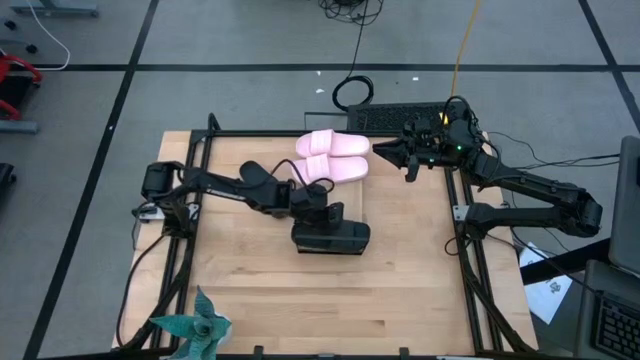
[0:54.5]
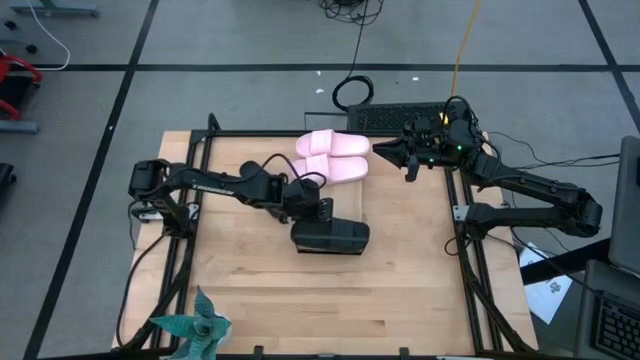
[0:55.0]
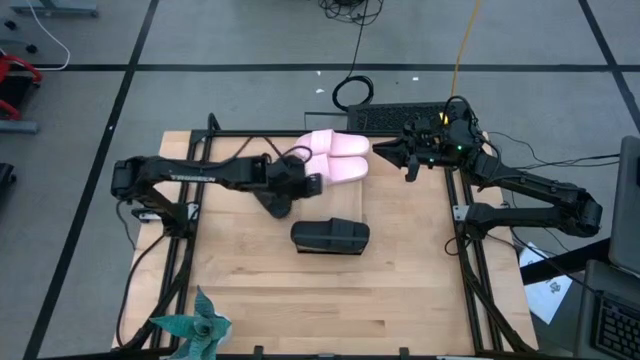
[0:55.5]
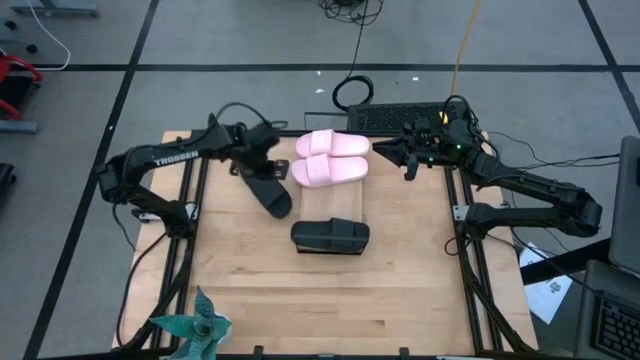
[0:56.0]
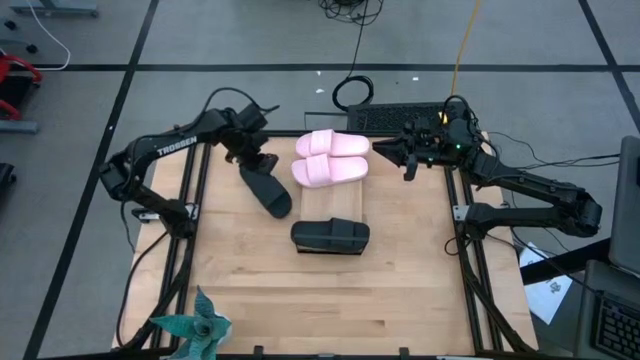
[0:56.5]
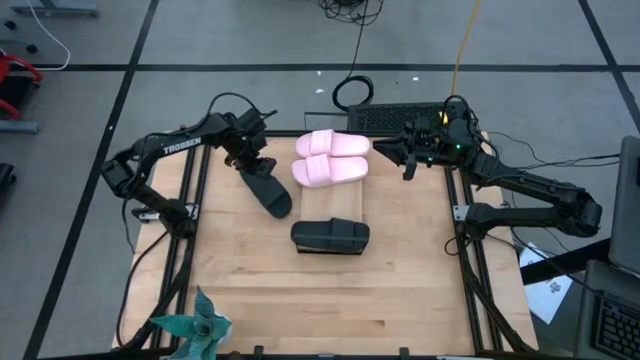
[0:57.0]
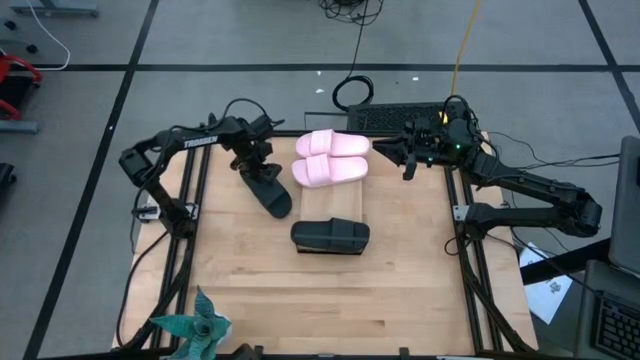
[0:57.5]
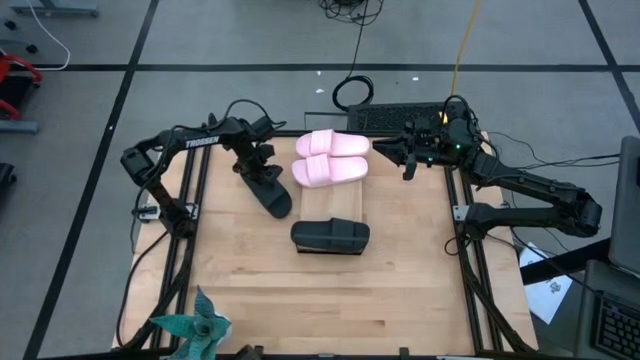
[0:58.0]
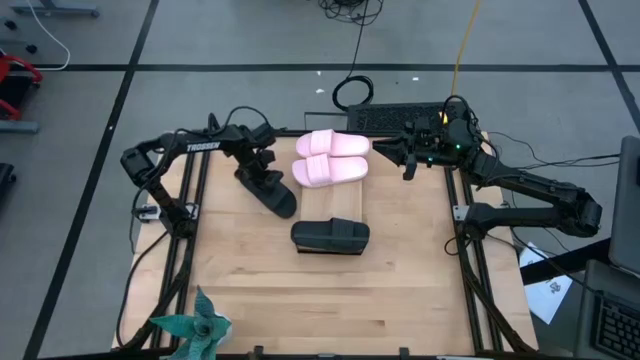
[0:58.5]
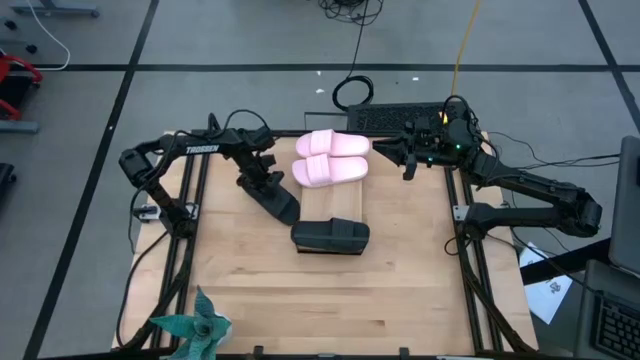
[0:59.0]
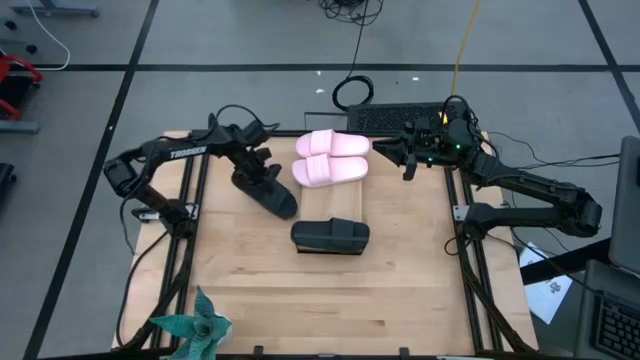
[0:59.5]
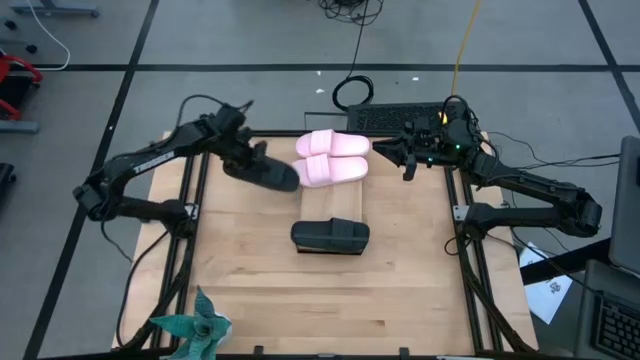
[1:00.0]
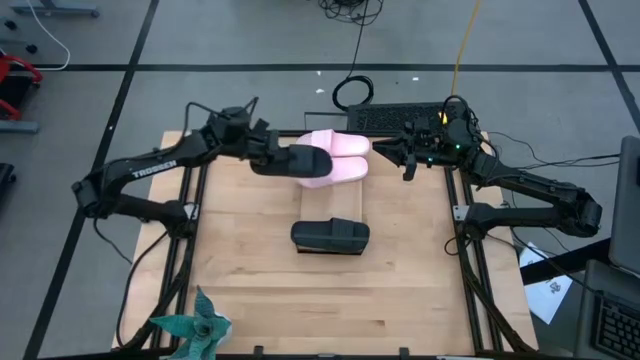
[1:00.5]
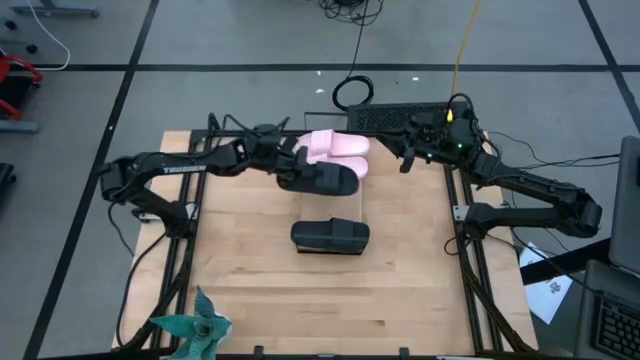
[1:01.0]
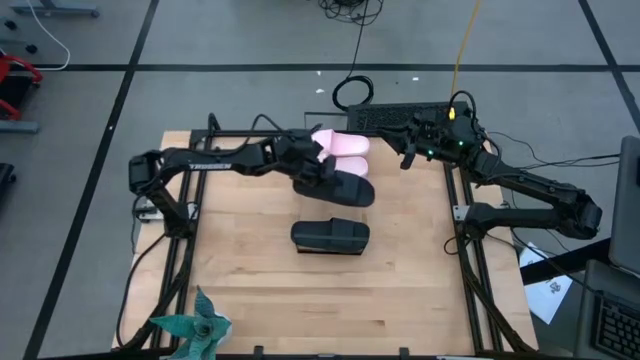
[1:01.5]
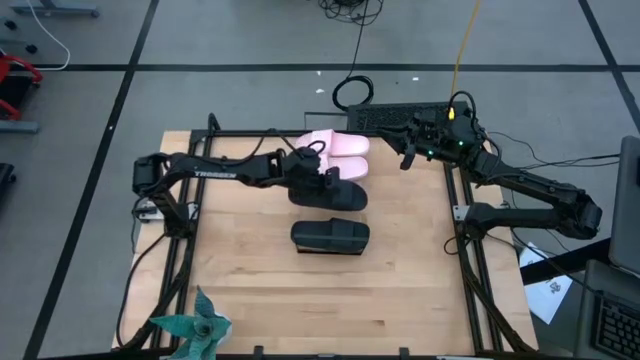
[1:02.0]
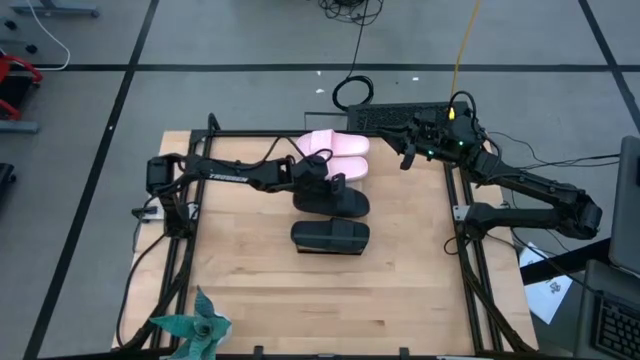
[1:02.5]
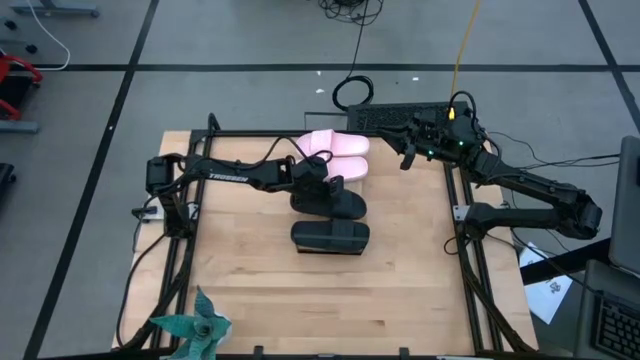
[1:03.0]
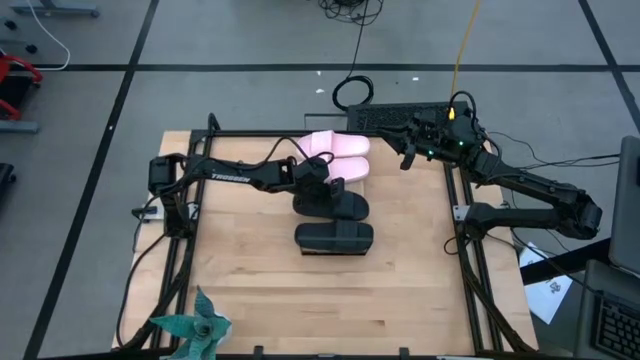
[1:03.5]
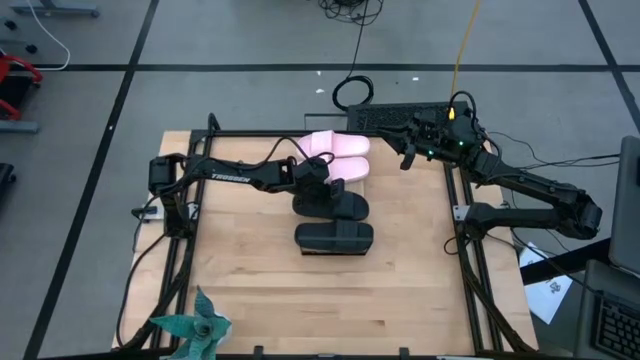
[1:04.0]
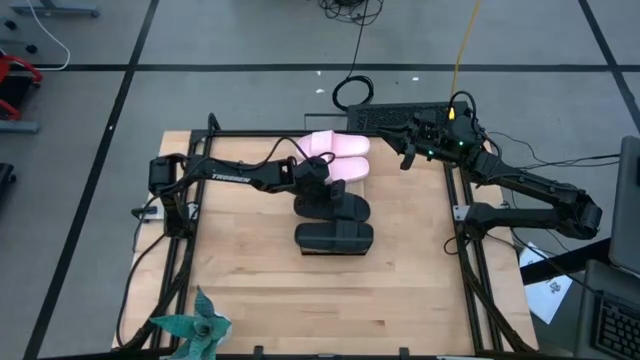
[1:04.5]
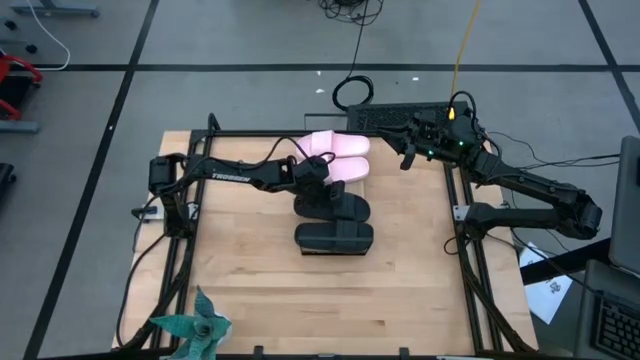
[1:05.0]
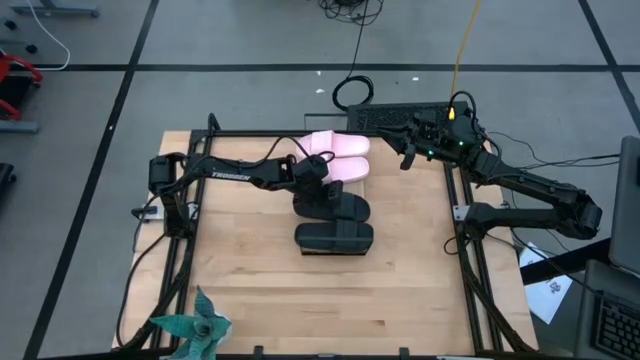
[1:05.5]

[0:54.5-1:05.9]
Task: Pick and place slides into the shelf
Put the black slide on the shelf

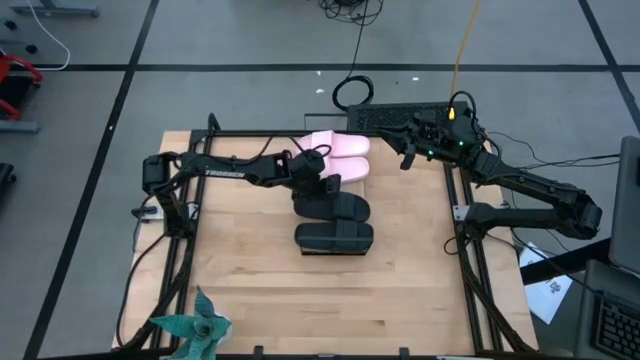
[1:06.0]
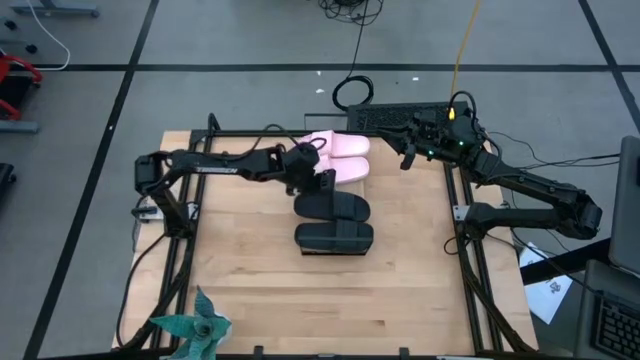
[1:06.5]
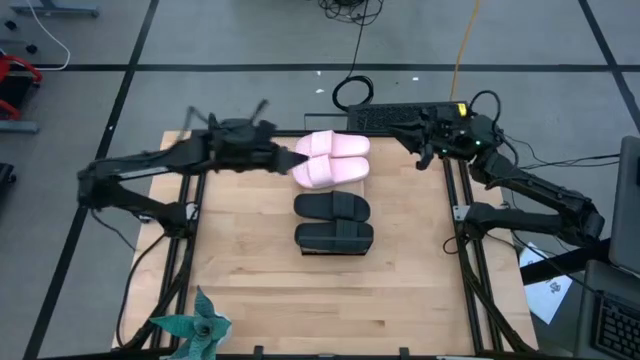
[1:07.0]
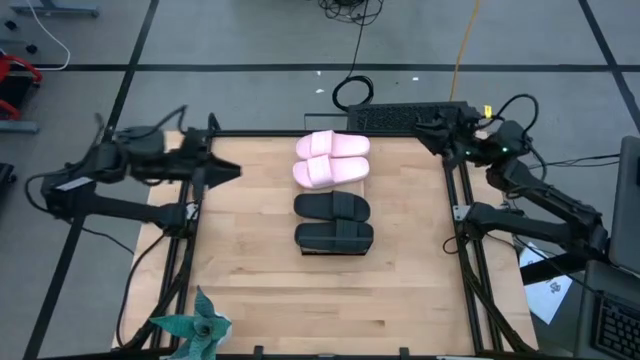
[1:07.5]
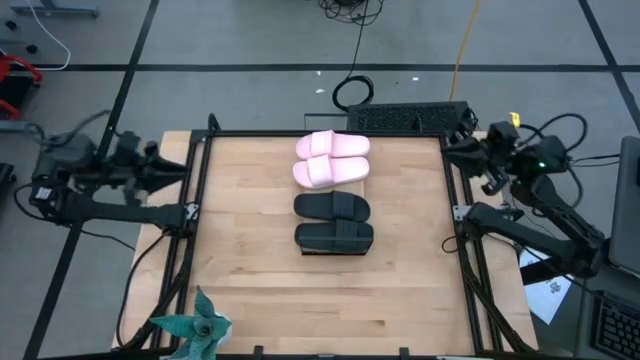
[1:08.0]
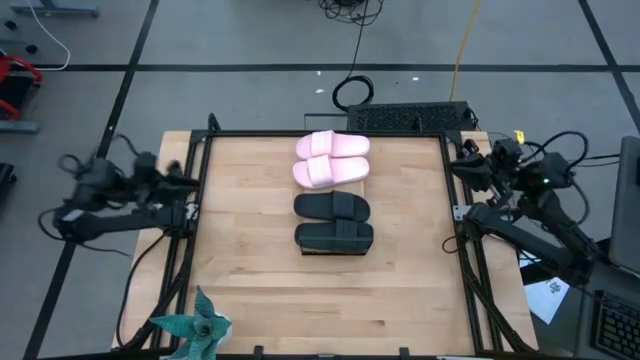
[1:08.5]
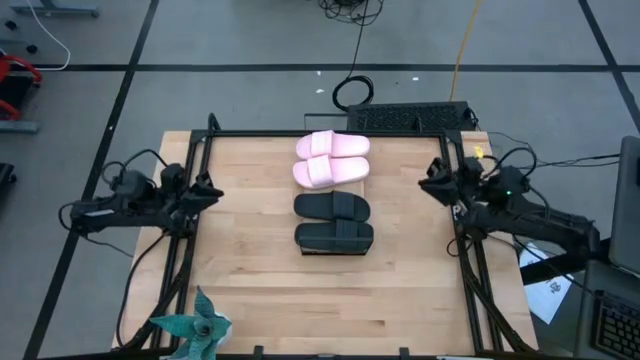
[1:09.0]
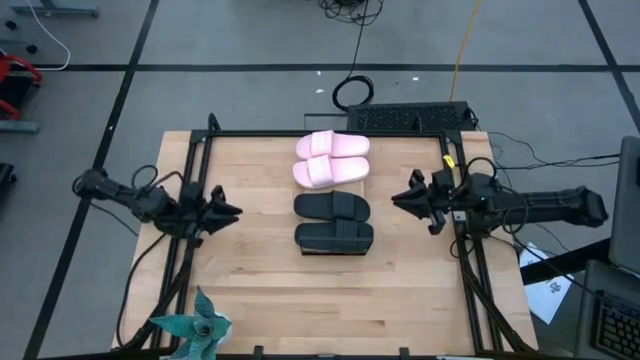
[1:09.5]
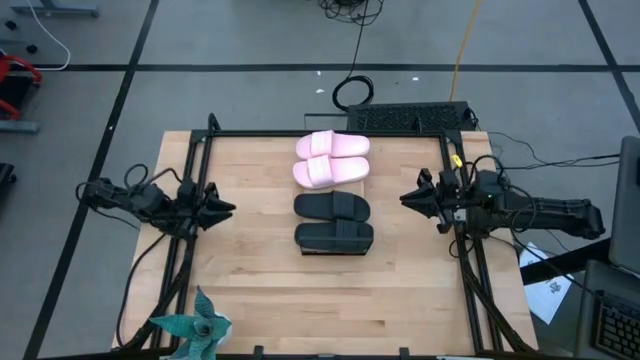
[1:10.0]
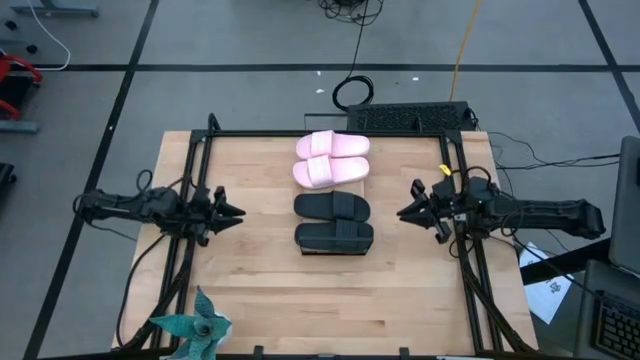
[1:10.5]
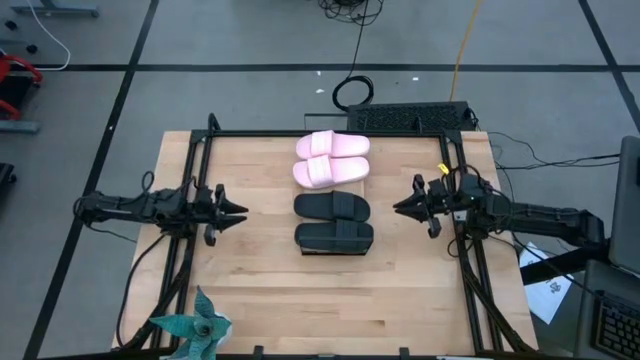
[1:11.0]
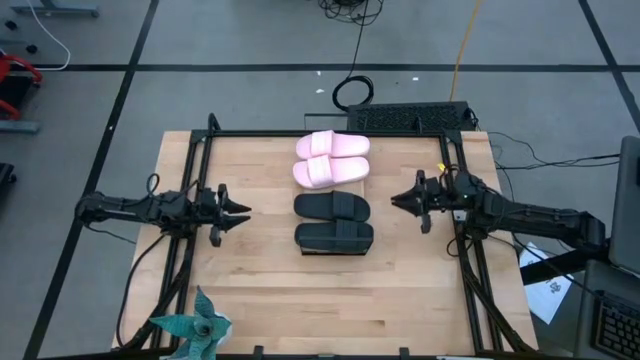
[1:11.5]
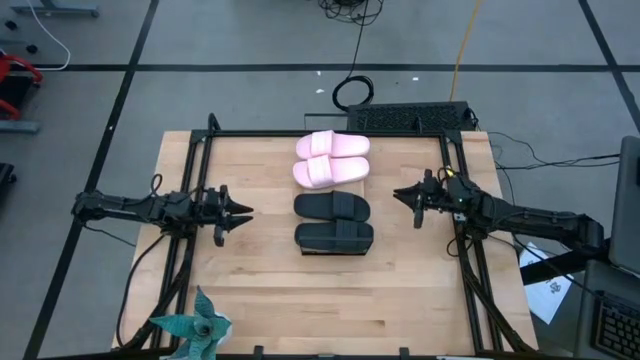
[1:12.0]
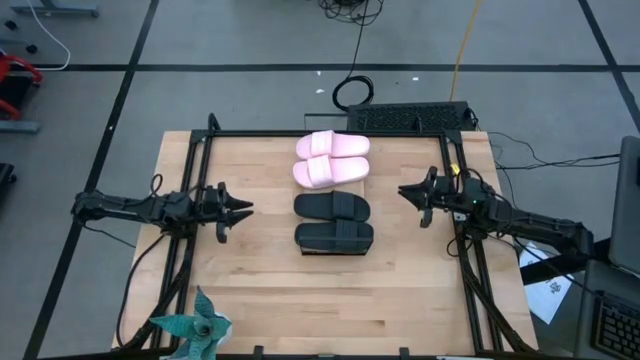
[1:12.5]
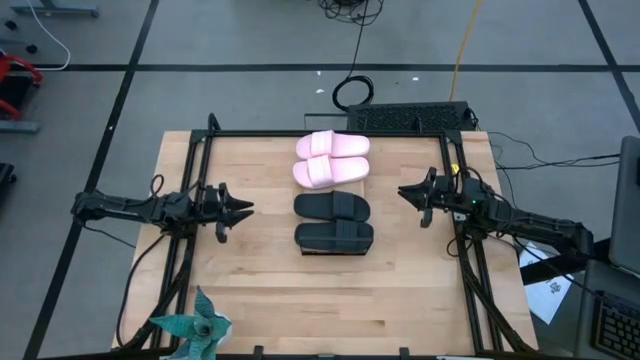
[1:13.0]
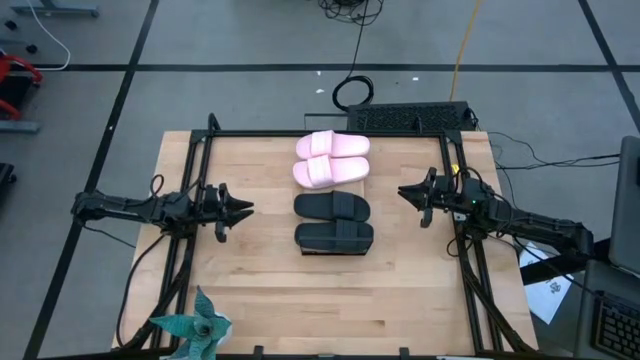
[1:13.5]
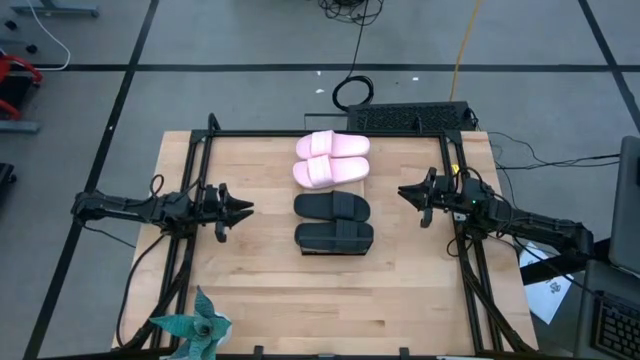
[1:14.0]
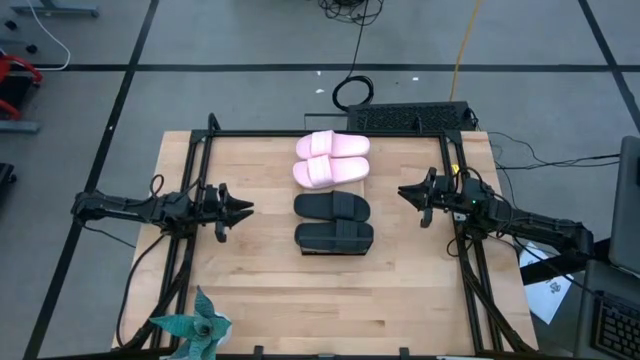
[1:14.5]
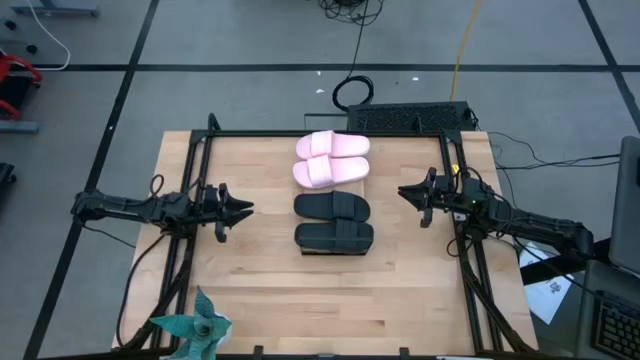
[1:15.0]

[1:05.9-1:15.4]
Return to Home Position
